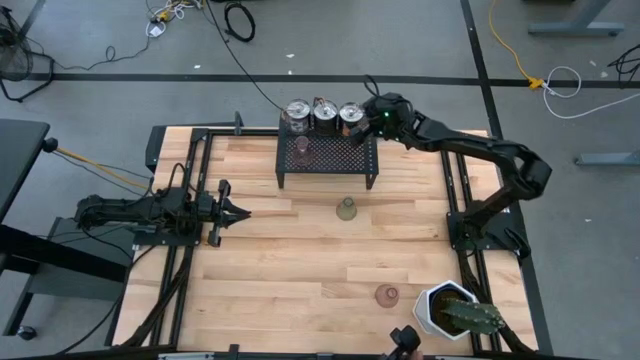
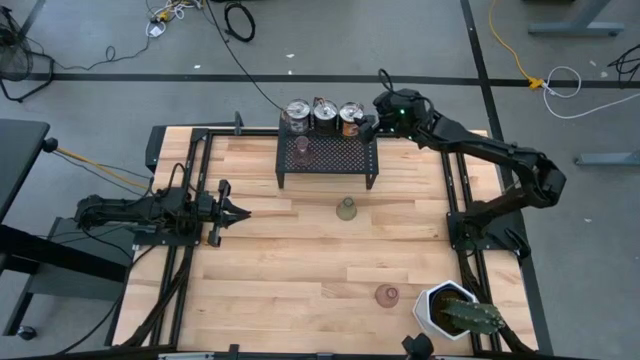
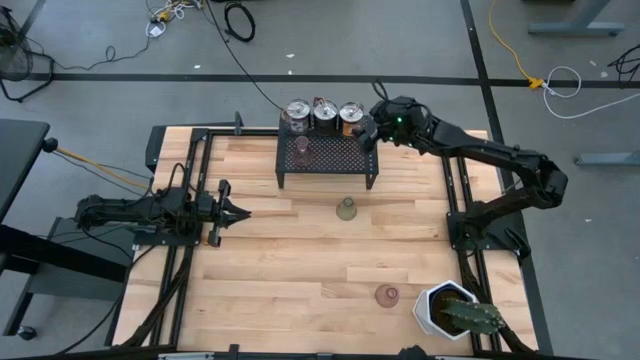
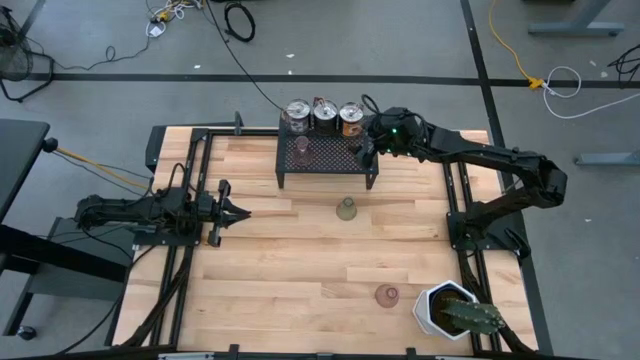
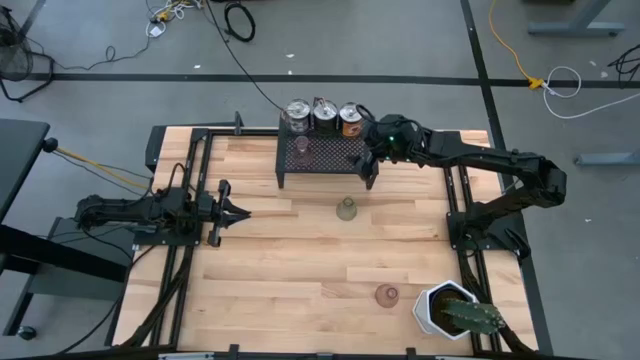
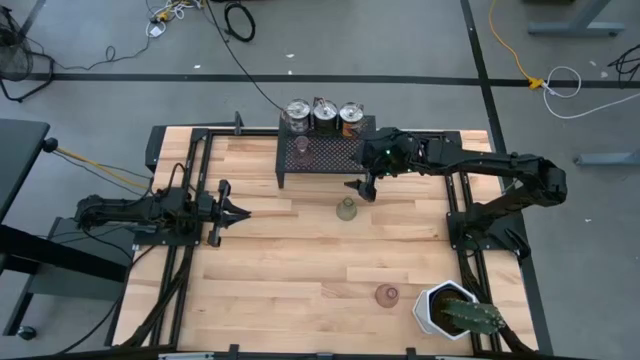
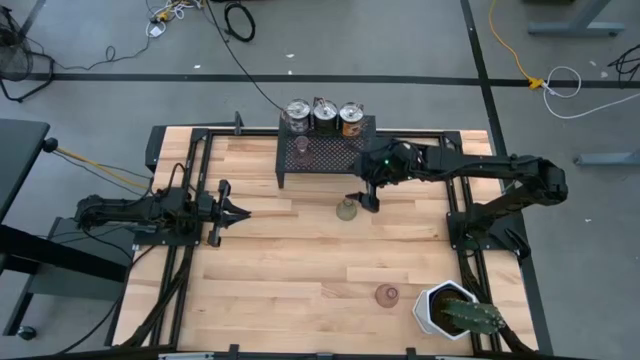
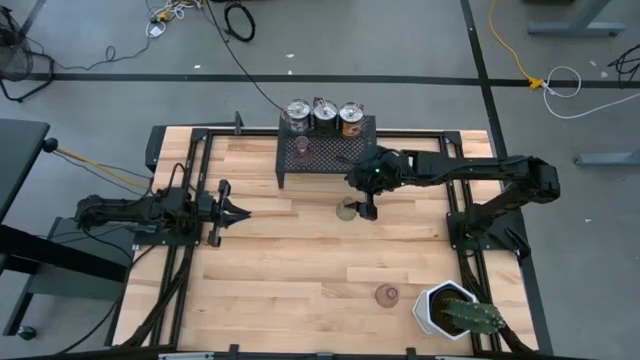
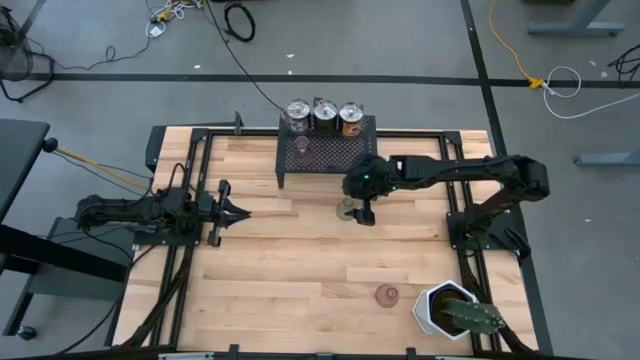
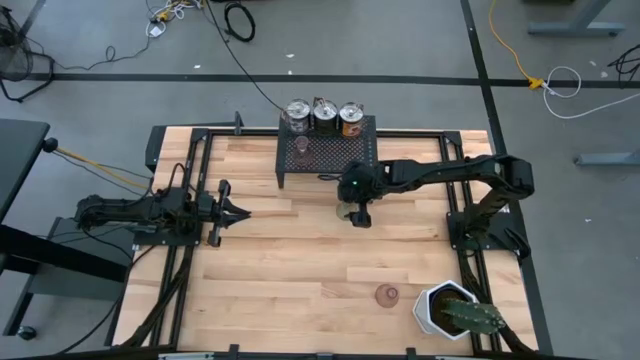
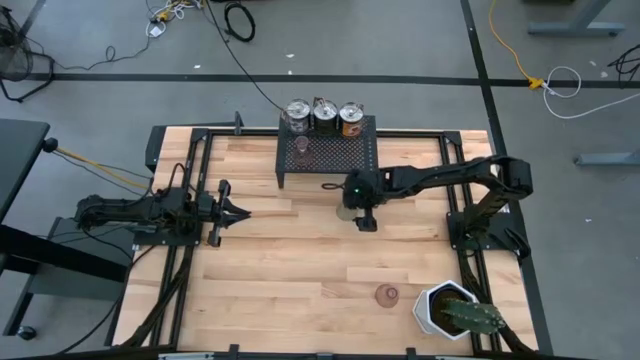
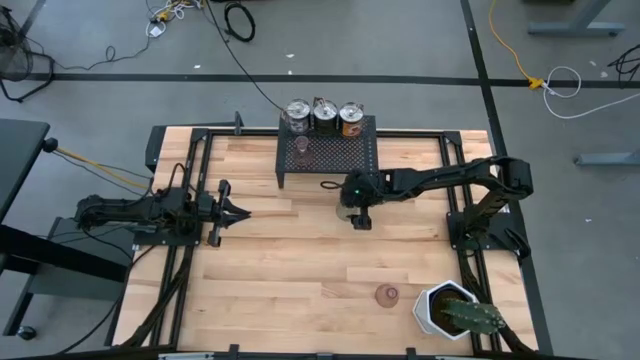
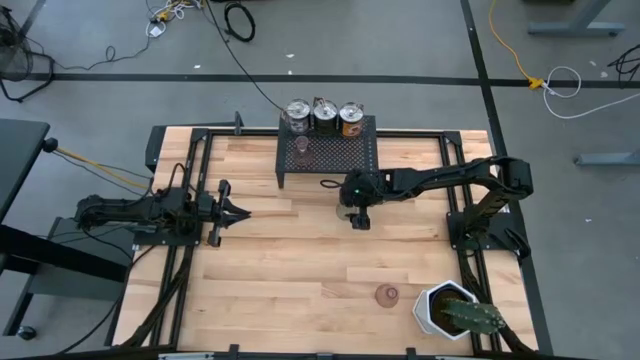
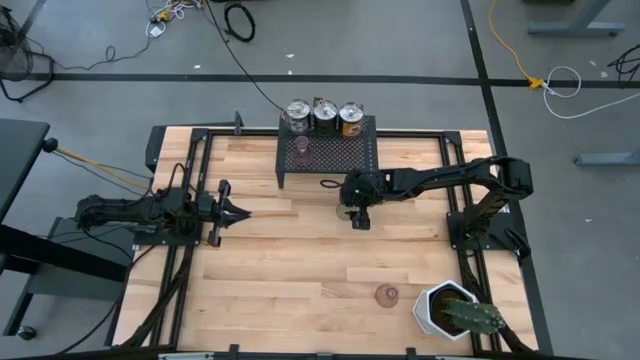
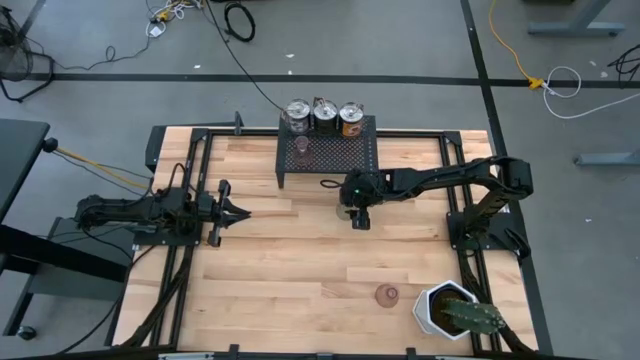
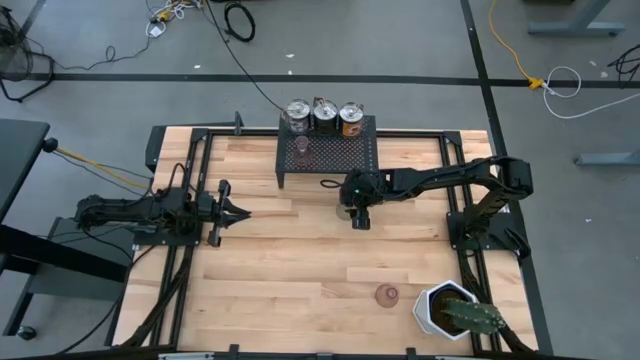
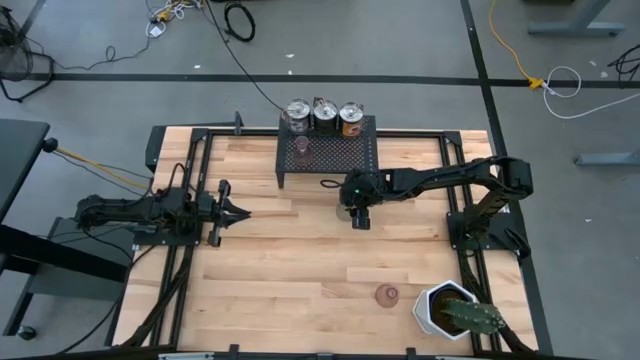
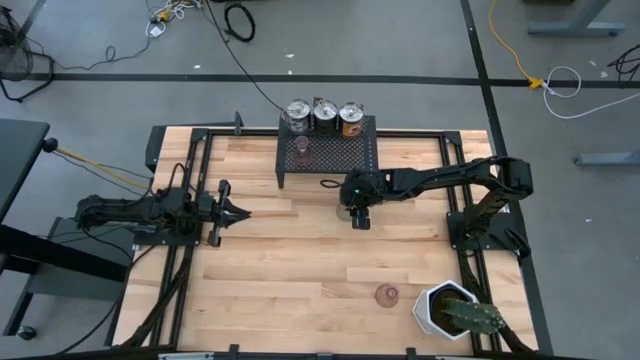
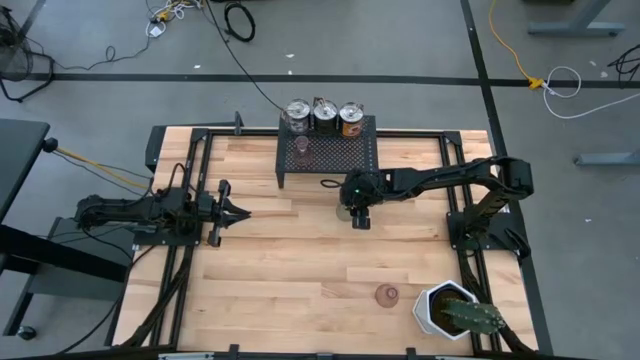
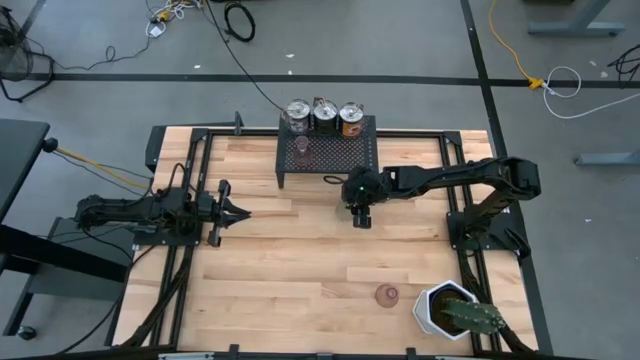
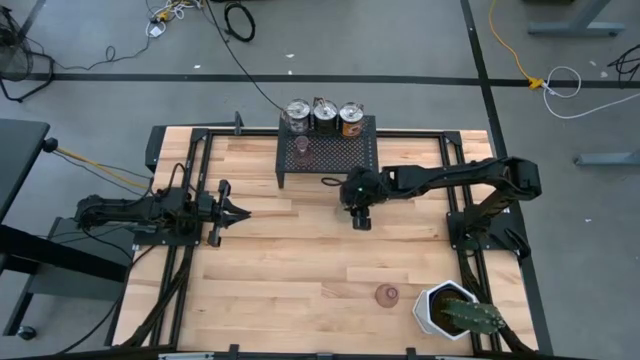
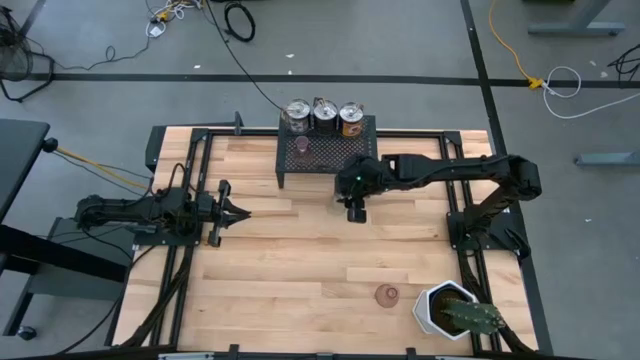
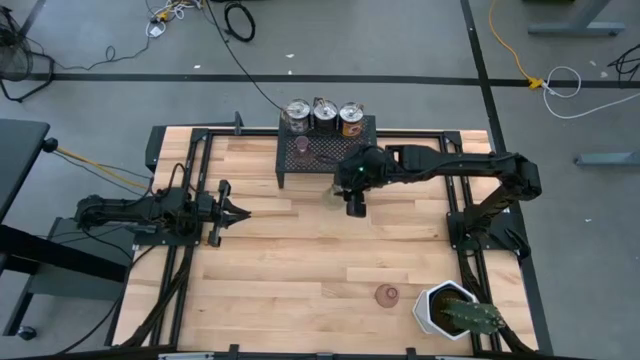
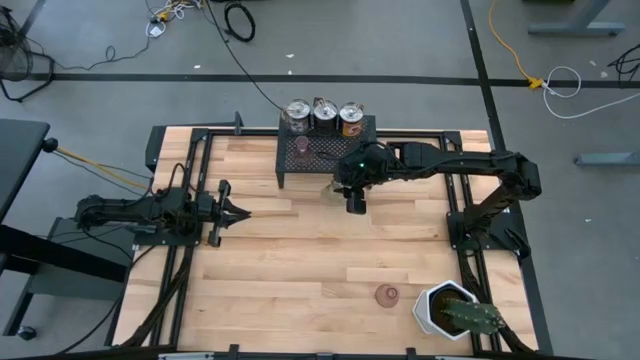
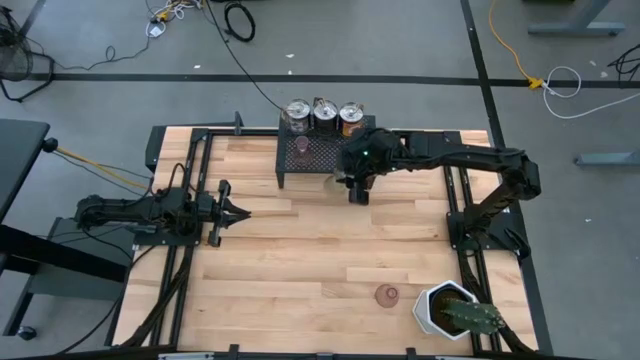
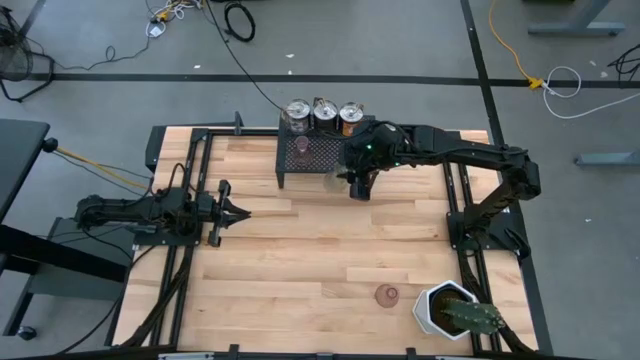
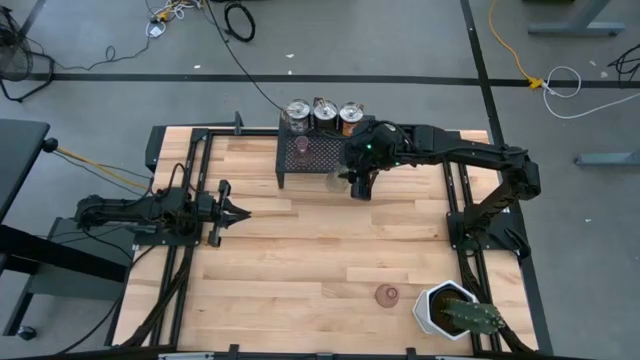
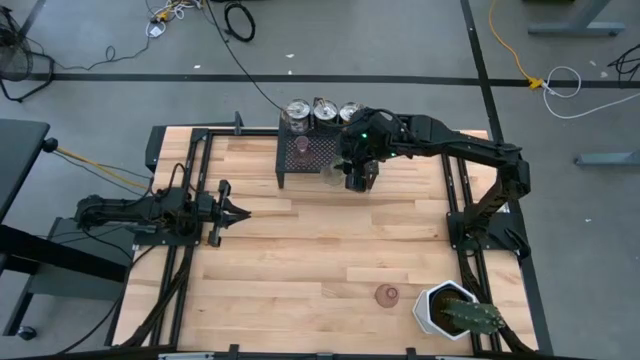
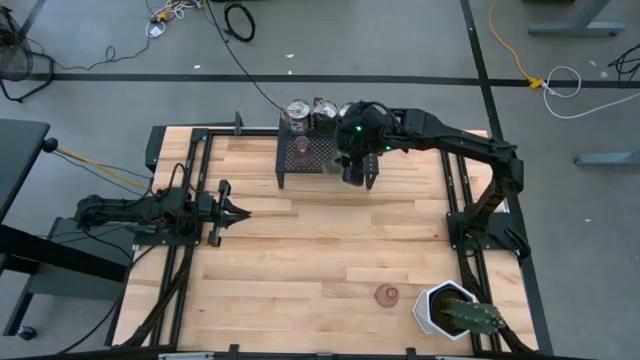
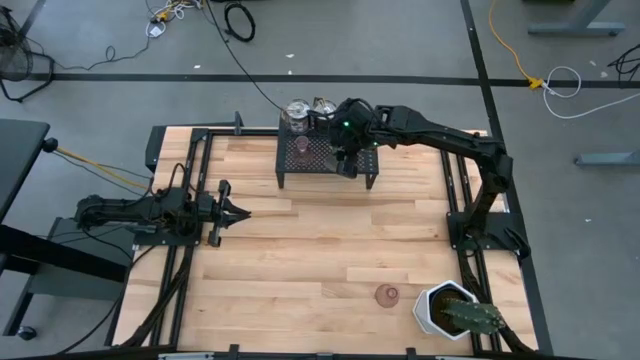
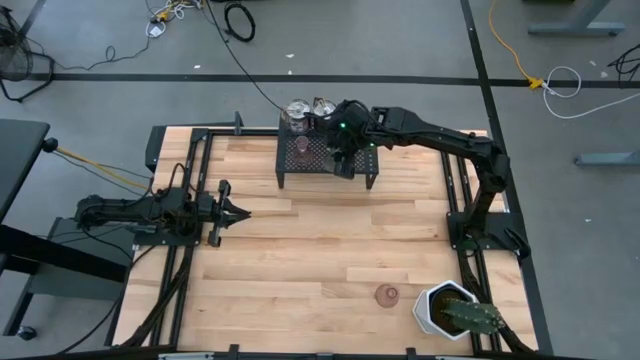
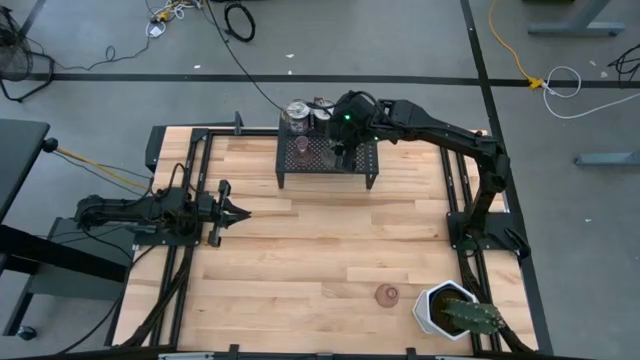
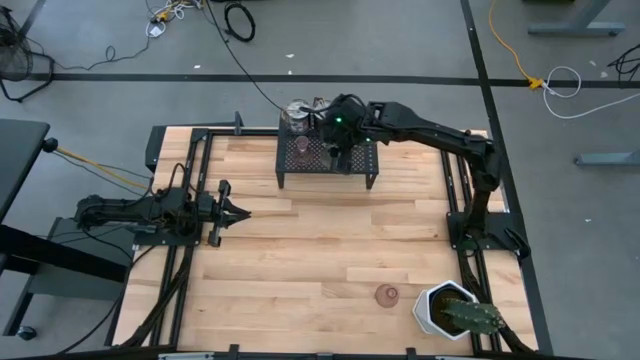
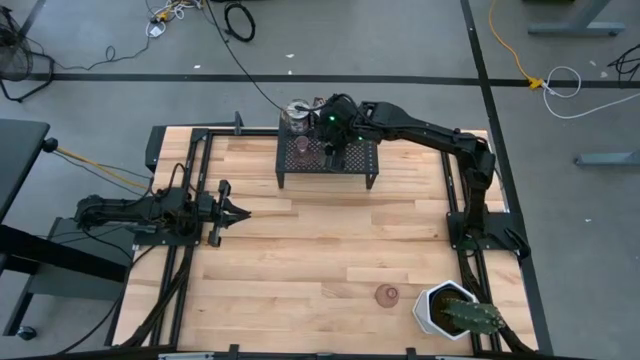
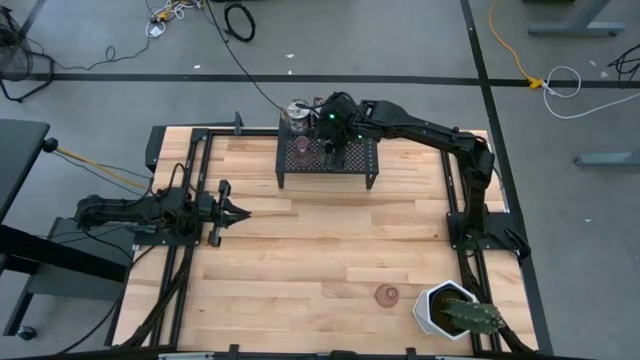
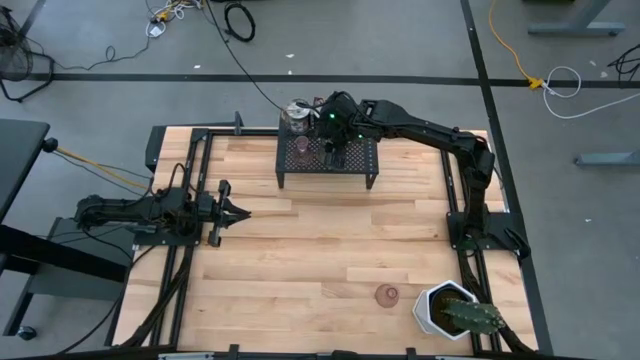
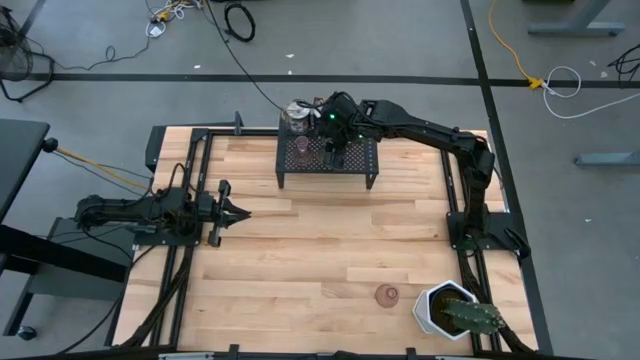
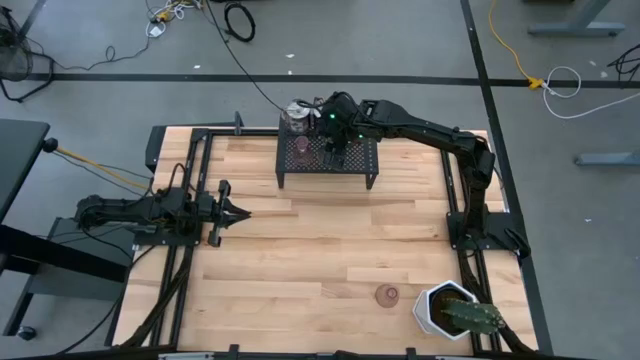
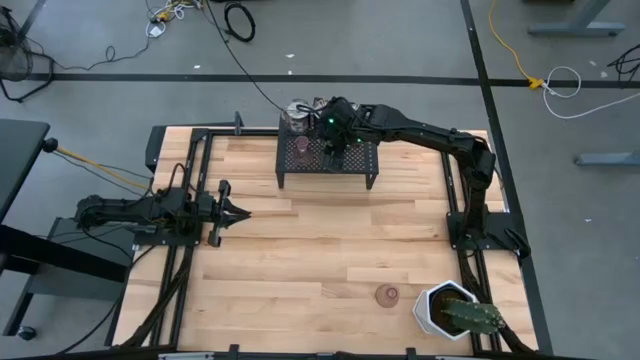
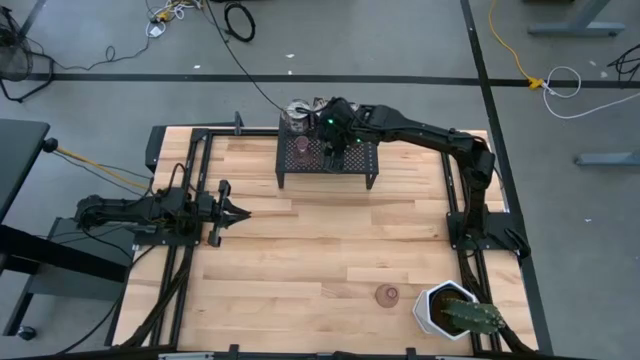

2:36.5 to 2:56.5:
Task: Pick & Place candle stick holders
Put the green vase candle holder on the shelf

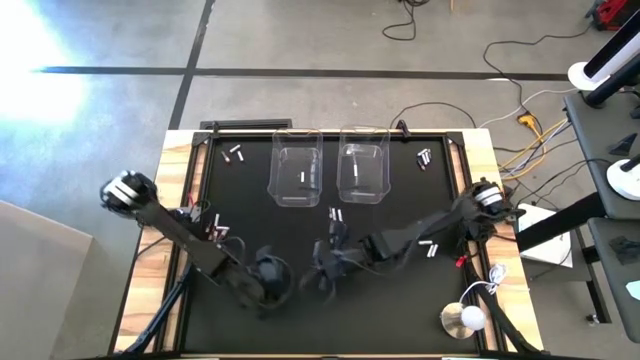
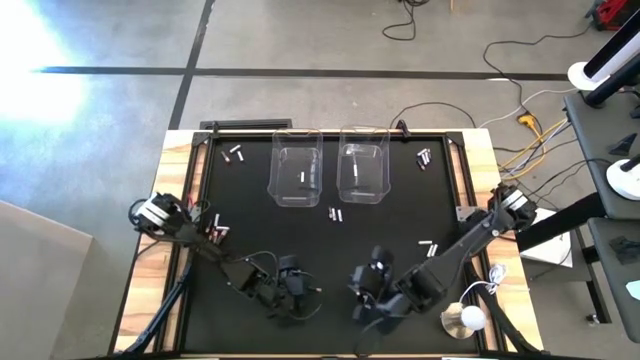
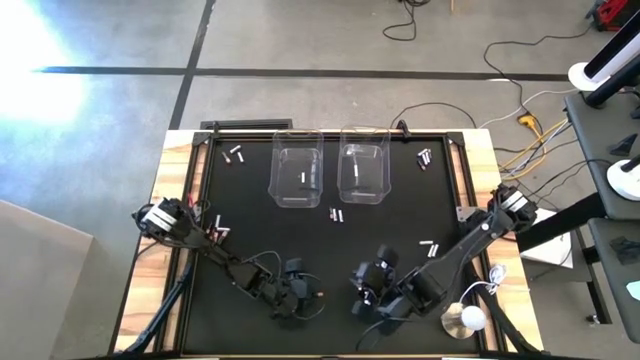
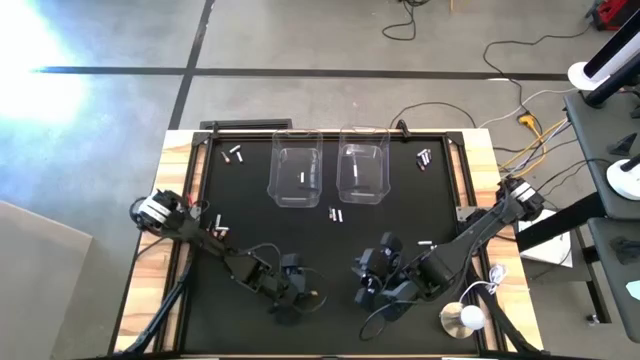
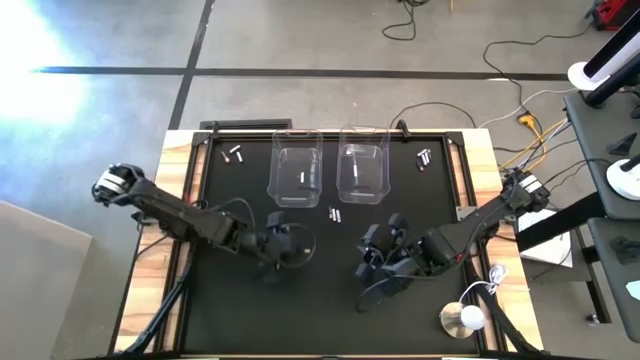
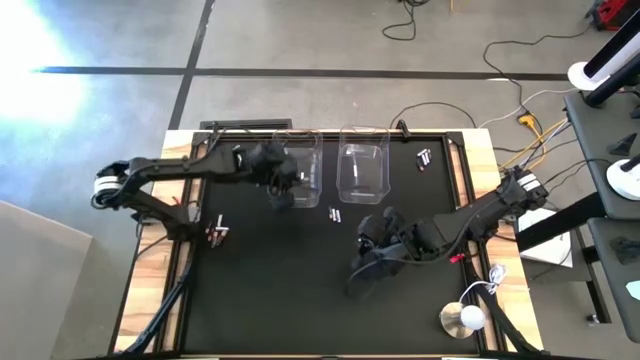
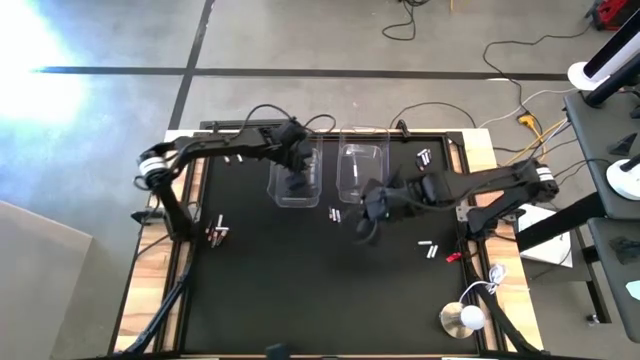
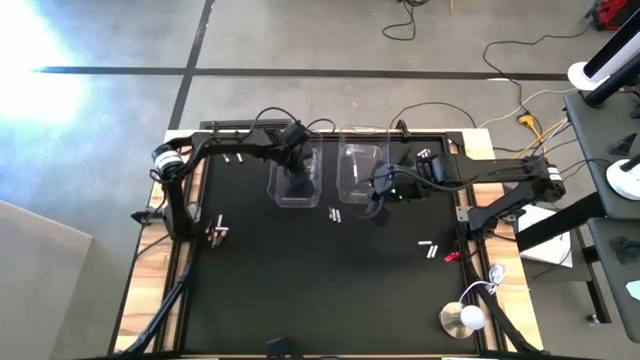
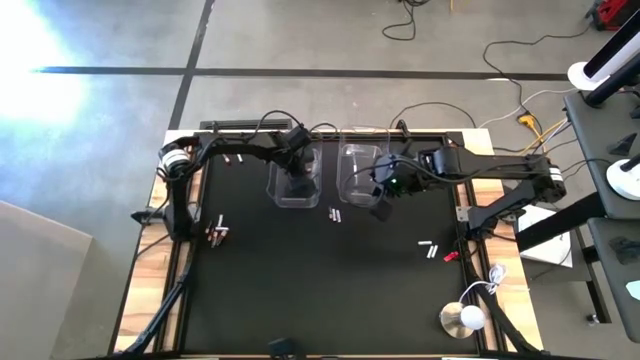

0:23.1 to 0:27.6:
Task: Sort batteries
Put the black battery into the left transparent bin
